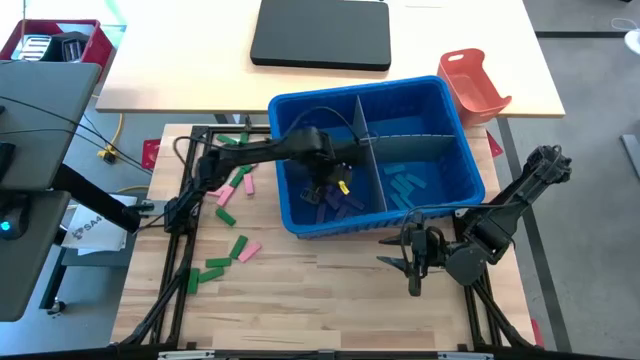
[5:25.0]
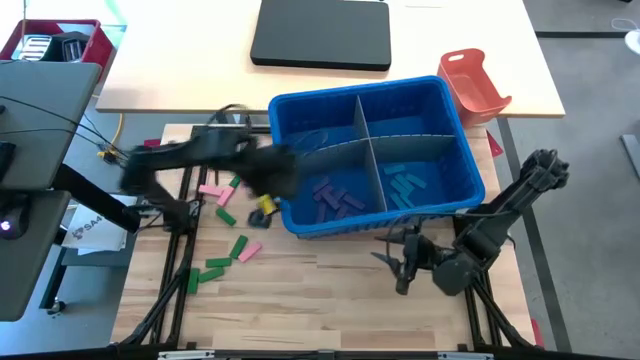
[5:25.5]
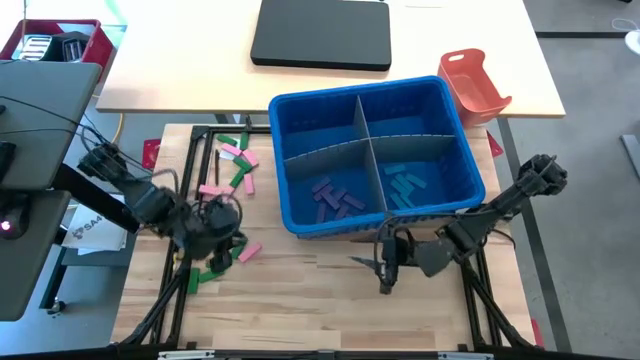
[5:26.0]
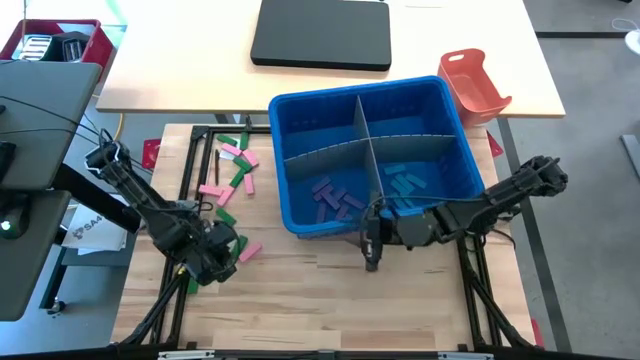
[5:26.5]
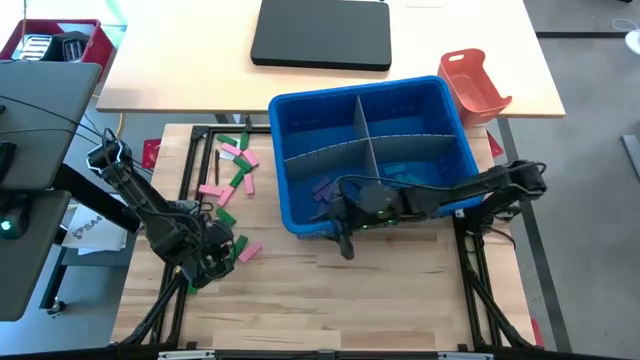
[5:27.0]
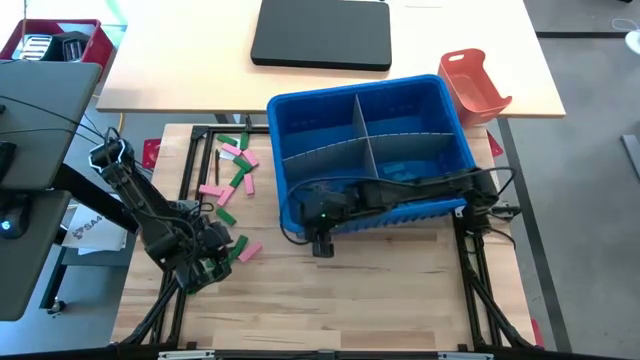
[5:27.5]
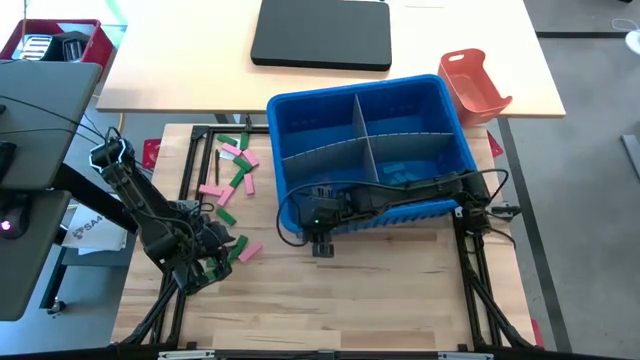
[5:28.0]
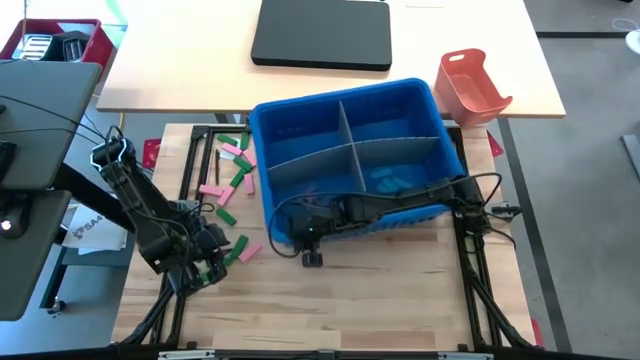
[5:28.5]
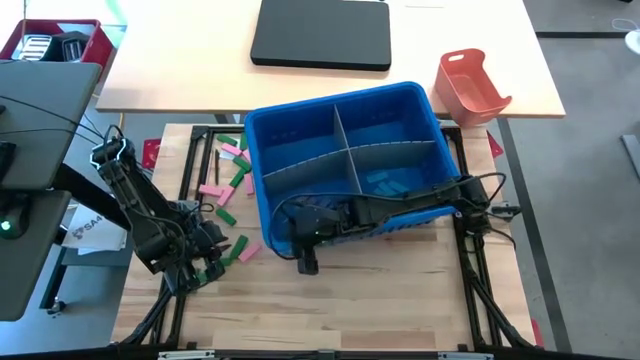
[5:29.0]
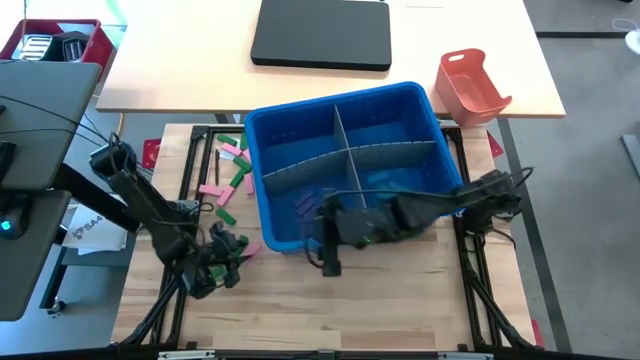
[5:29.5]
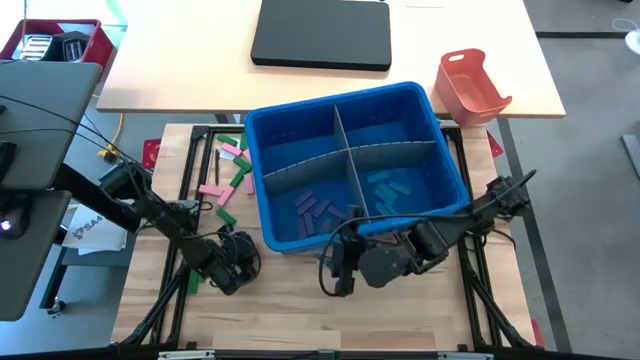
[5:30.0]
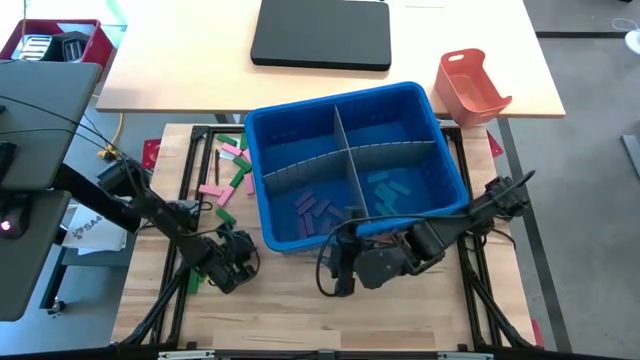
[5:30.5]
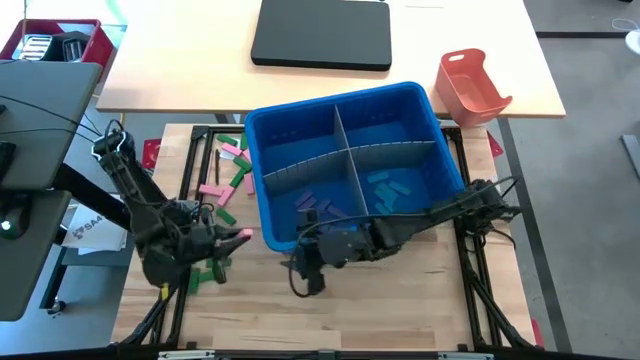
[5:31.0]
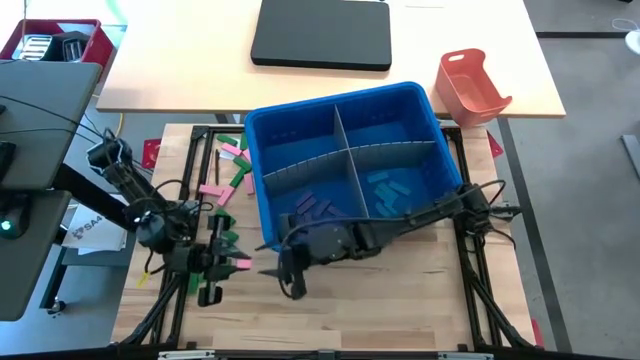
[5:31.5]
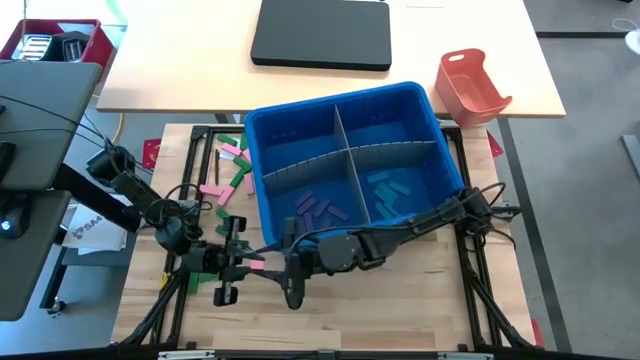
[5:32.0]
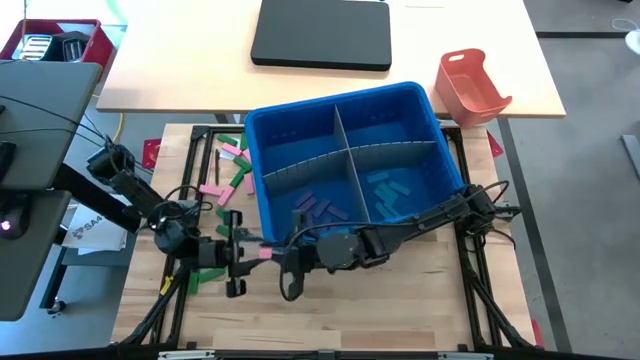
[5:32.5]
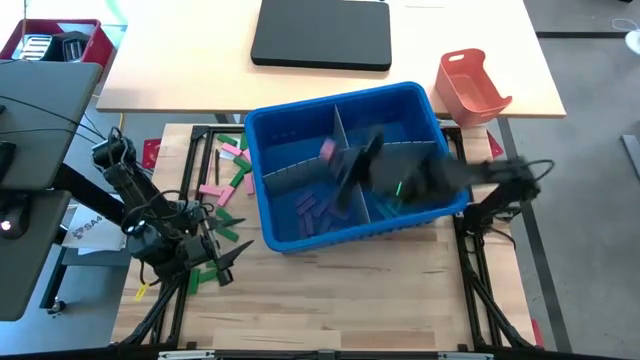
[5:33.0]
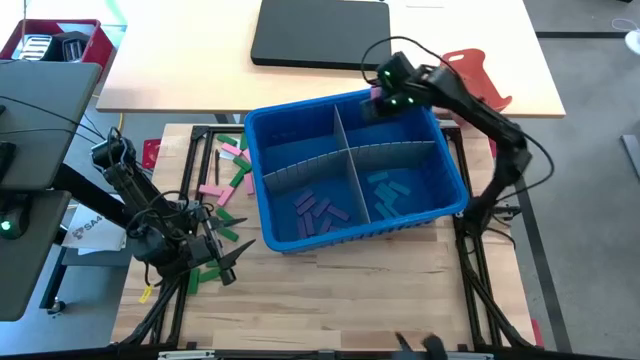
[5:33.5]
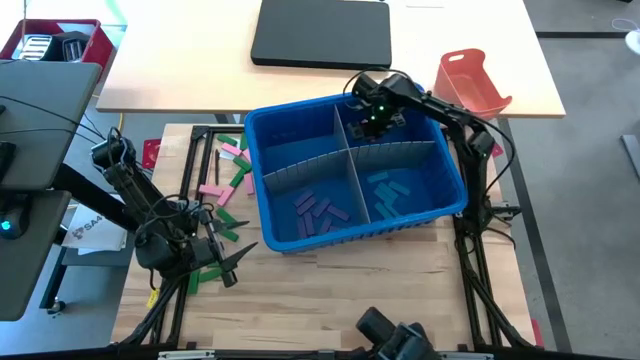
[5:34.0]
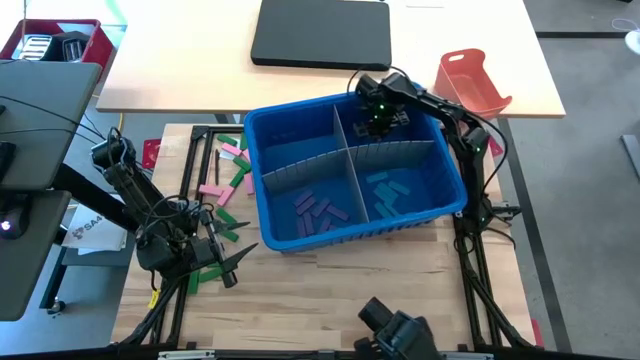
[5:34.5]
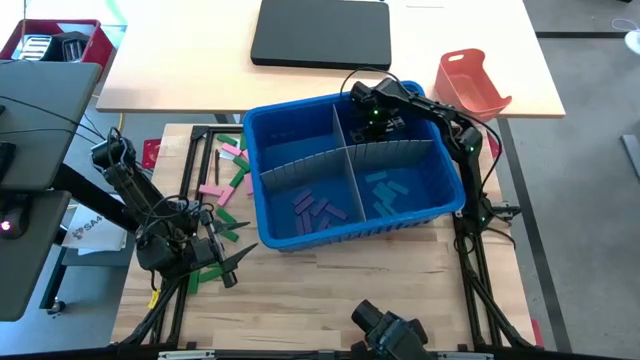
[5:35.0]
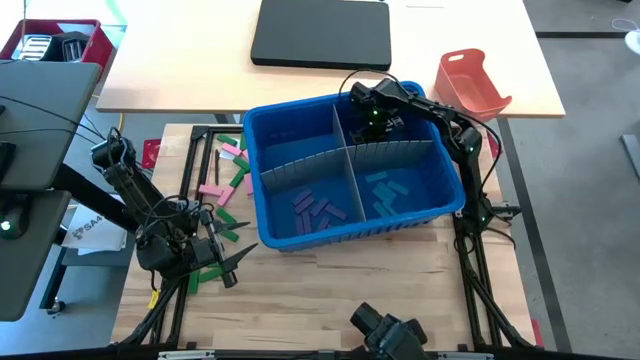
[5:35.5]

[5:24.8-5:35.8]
Task: Sort blocks
Put the pink block into the blue bin

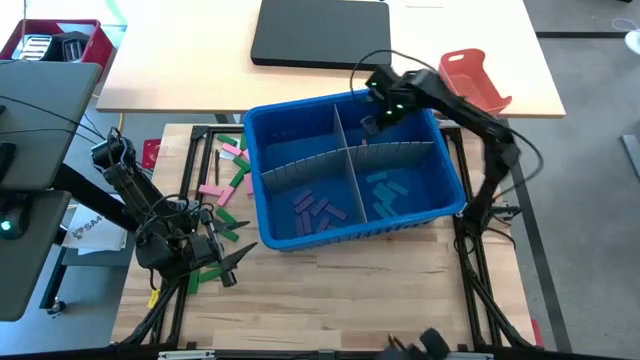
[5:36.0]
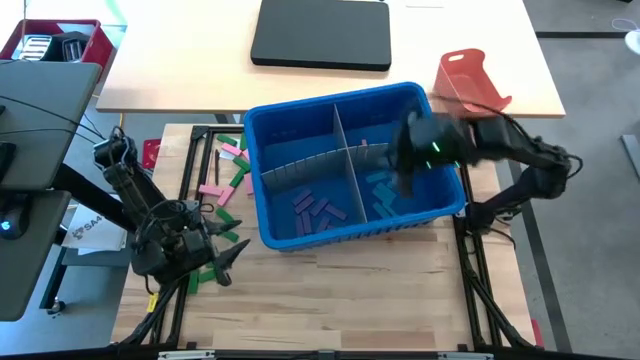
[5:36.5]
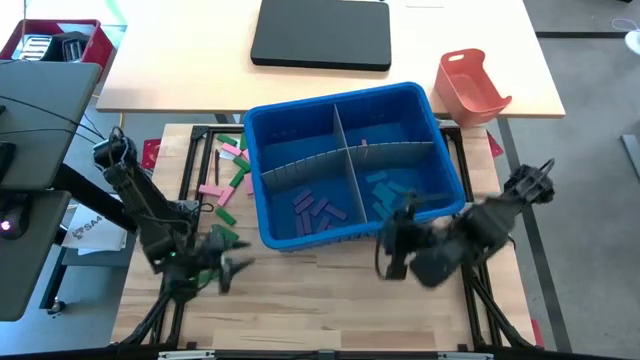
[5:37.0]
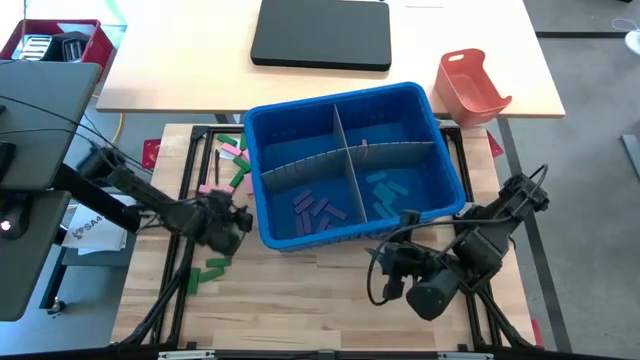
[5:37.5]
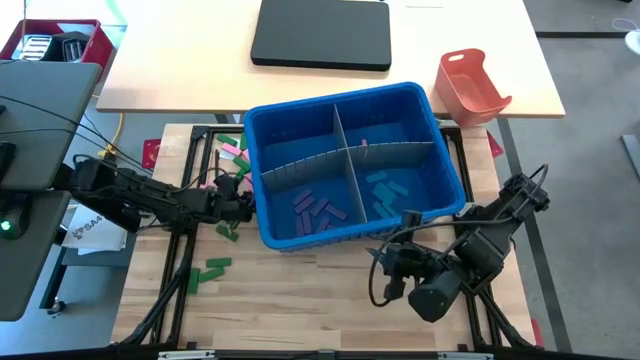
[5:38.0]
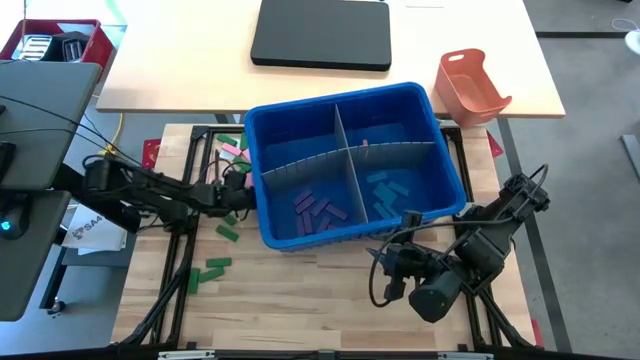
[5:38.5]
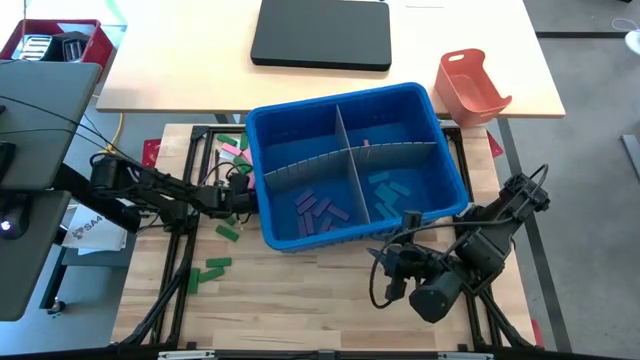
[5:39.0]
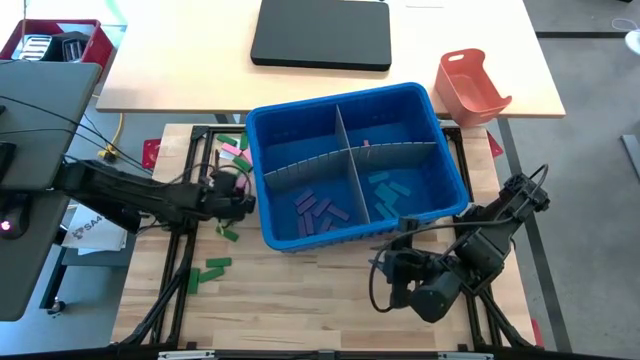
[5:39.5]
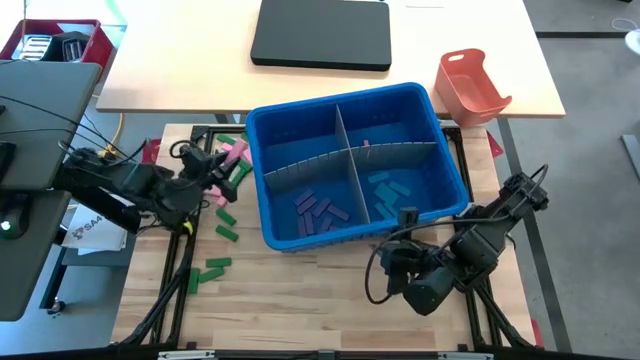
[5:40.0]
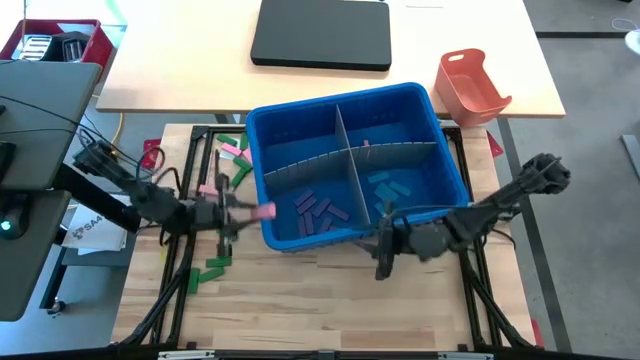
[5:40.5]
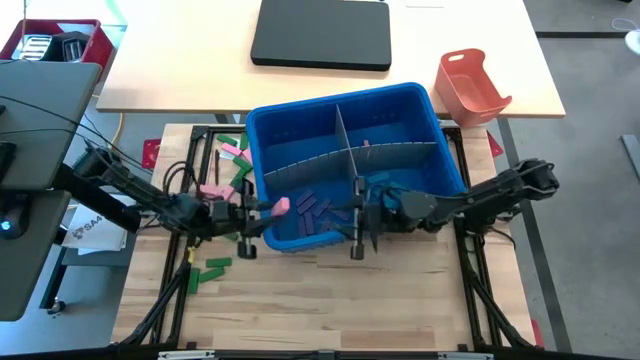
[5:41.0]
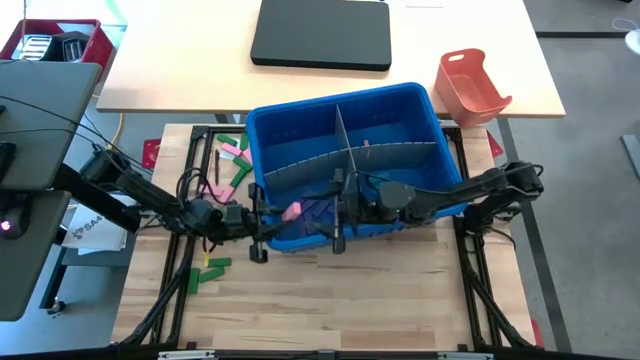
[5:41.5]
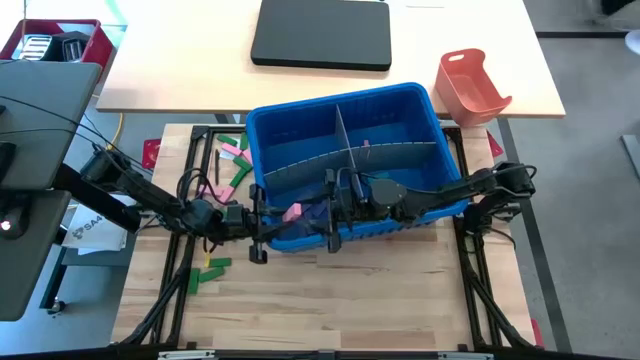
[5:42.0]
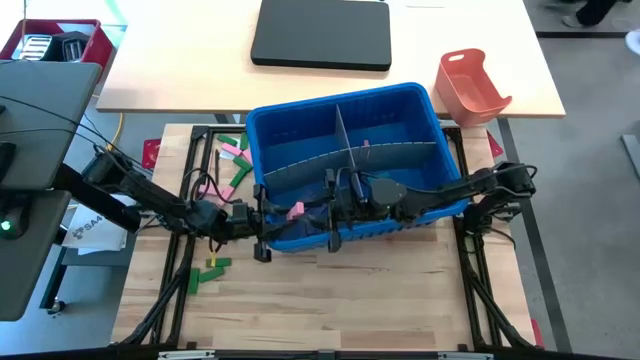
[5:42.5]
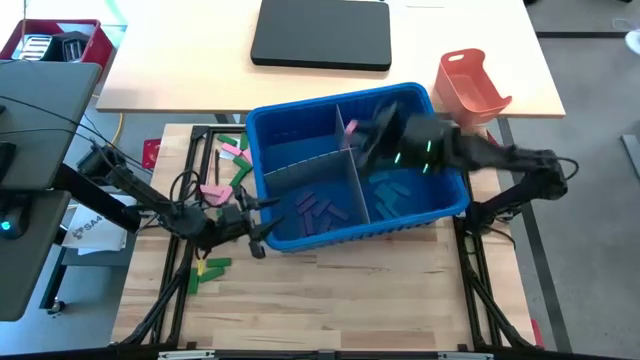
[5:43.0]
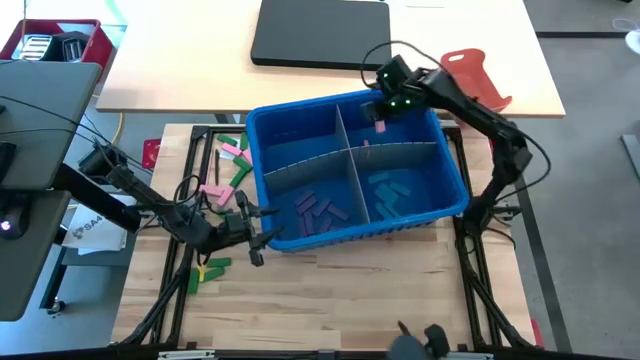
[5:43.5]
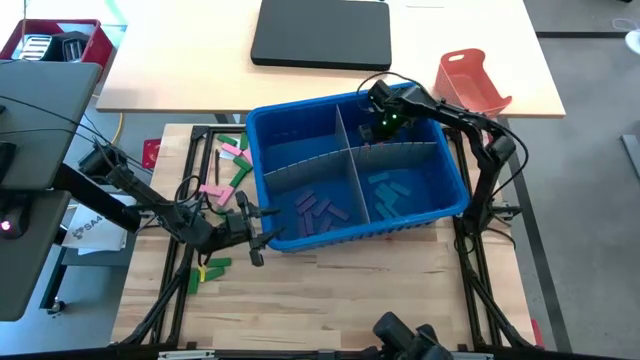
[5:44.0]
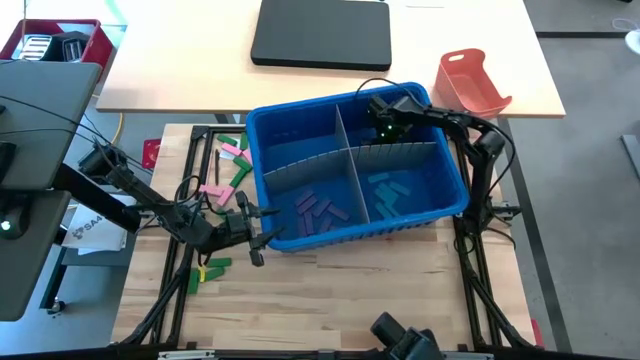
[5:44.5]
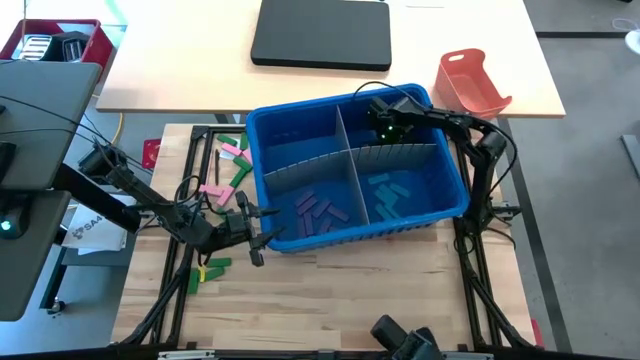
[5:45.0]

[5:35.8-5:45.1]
Put the pink block into the blue bin with the other pink block
